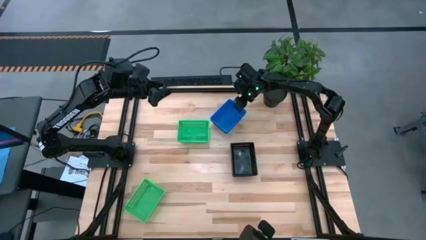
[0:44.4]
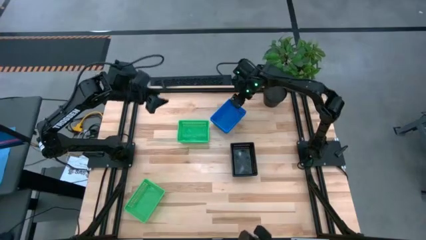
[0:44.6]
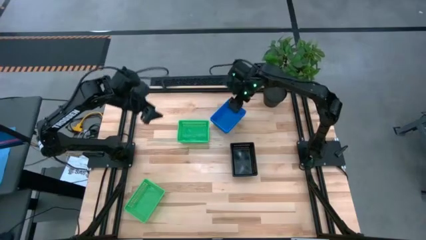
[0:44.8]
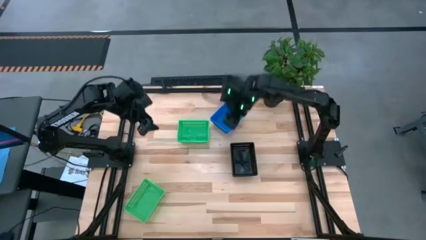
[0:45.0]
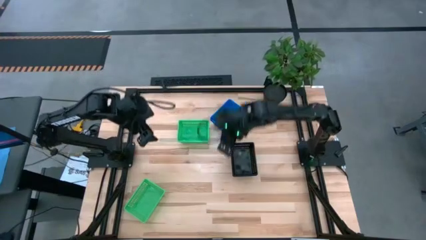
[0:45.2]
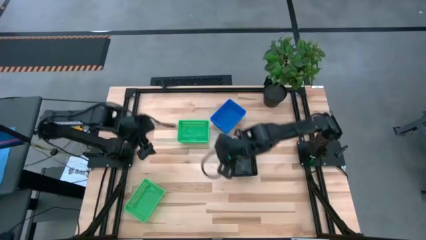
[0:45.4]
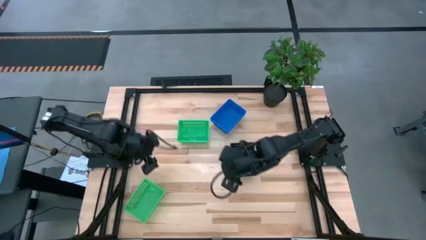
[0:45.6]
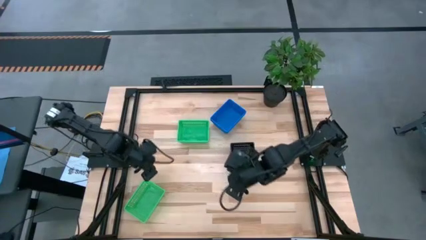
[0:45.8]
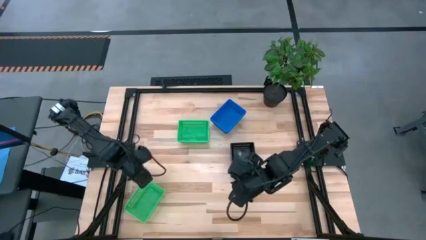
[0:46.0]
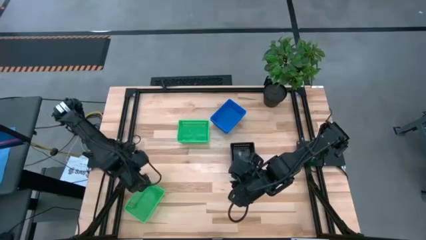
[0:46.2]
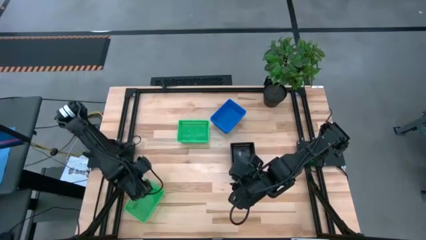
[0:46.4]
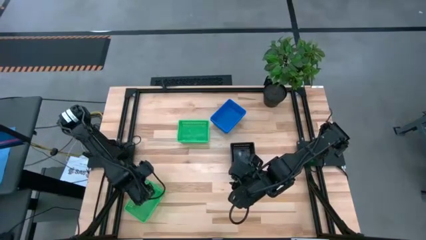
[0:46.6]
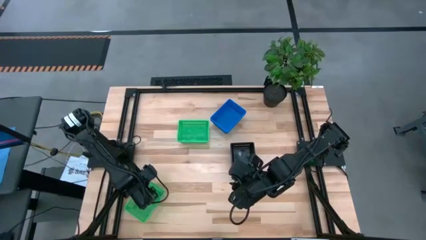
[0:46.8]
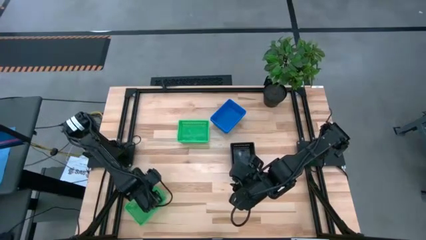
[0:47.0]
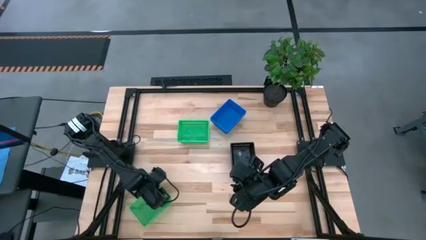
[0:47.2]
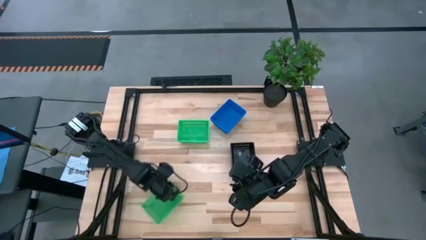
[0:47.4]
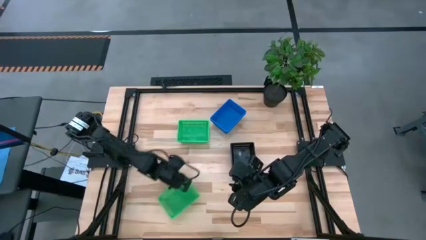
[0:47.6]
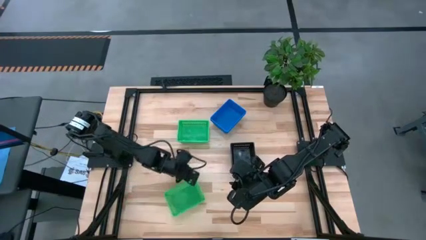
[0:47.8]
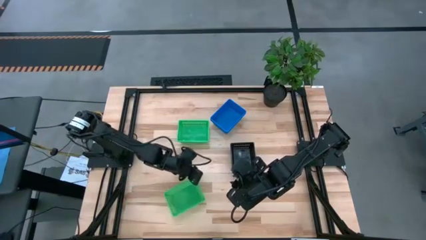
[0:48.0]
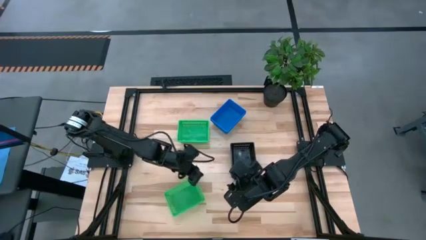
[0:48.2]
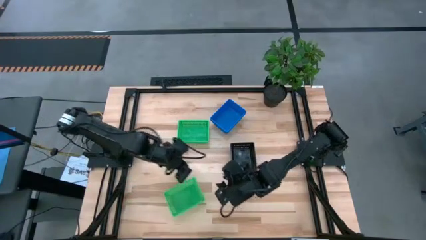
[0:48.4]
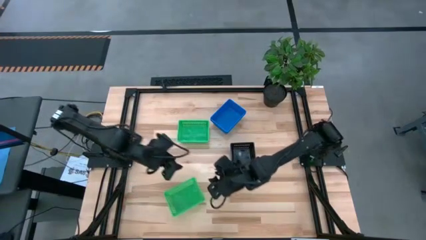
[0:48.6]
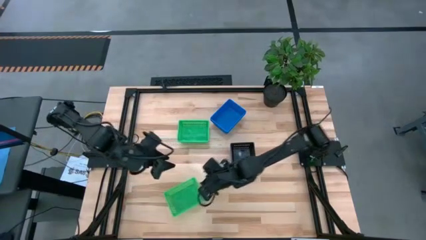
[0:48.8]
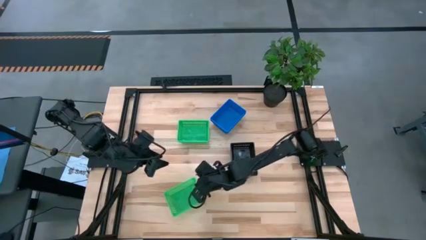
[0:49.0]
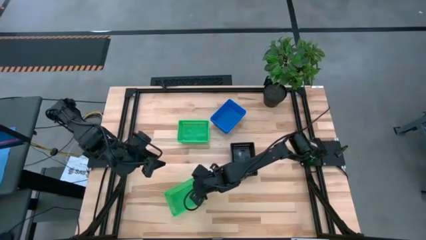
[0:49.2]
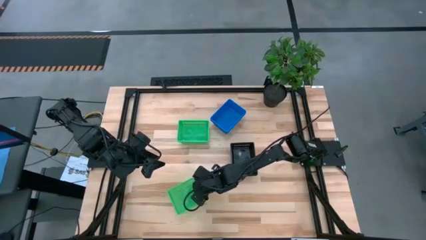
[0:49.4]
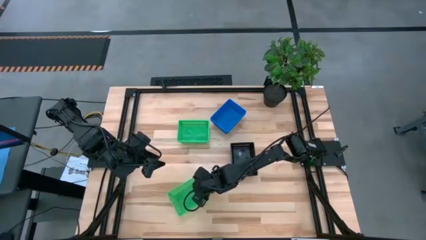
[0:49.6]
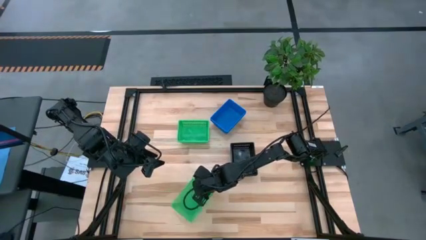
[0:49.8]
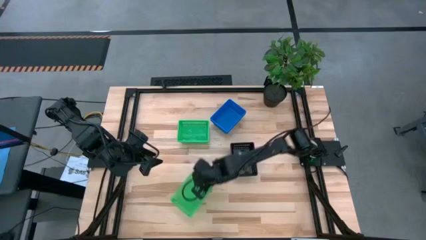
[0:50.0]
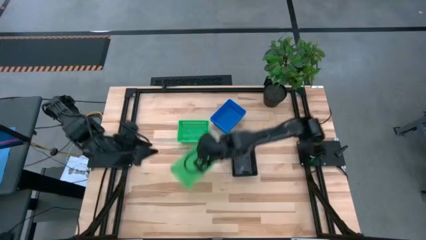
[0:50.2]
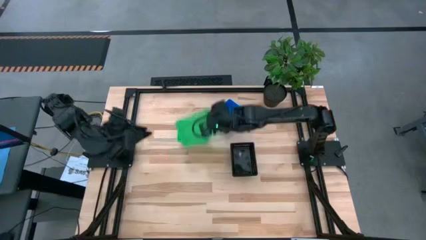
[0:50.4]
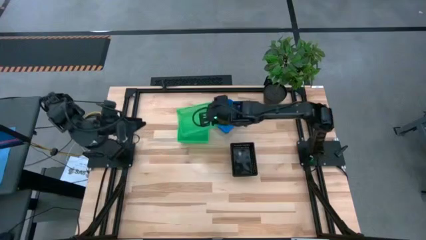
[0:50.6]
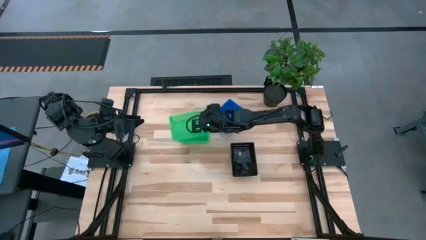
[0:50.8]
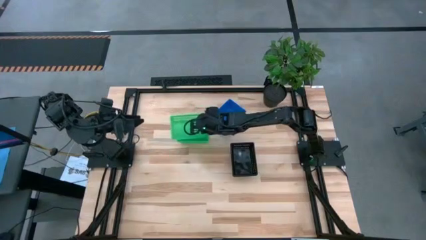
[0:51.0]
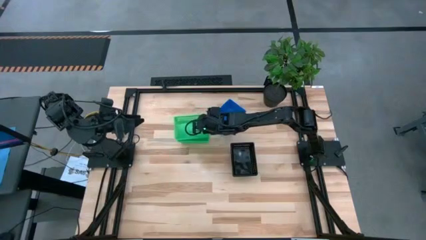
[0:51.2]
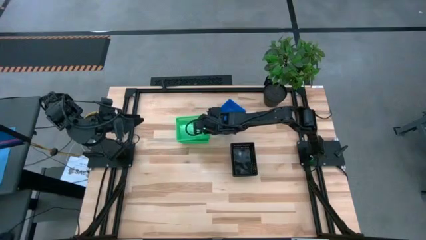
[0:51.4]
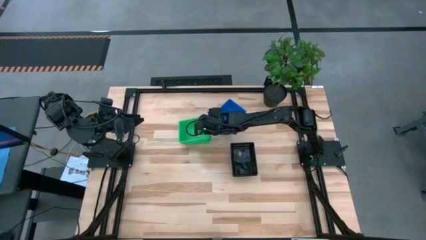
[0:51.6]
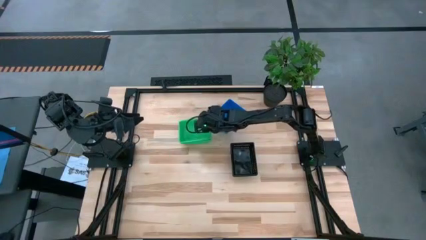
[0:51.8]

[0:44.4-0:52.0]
Stack the bottom green bin on the top green bin

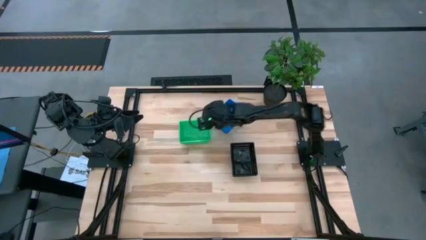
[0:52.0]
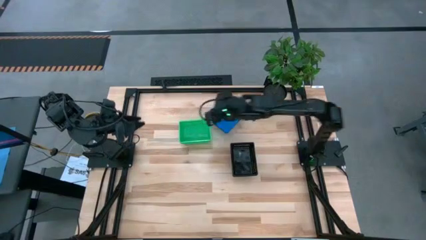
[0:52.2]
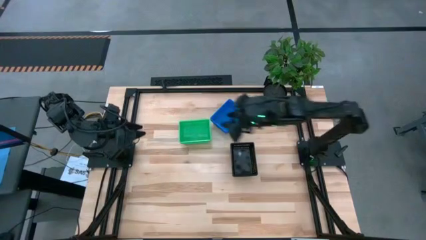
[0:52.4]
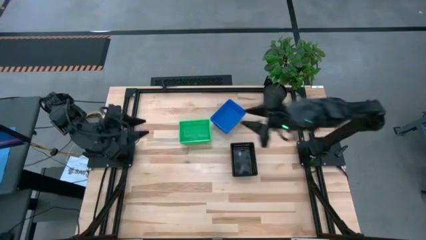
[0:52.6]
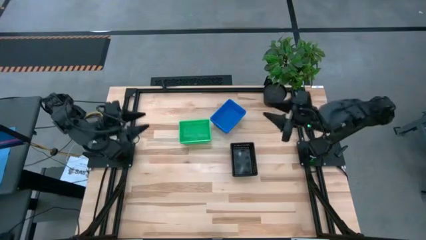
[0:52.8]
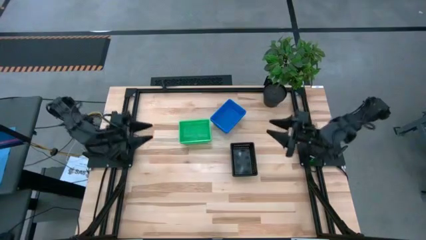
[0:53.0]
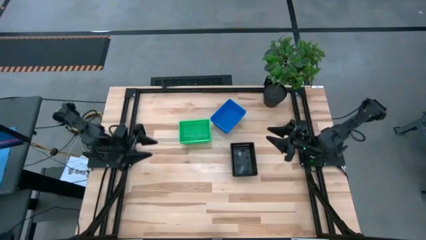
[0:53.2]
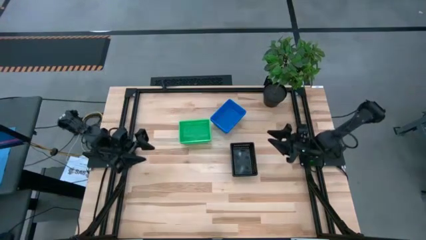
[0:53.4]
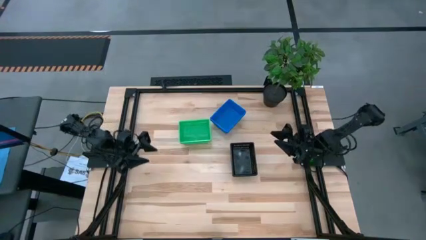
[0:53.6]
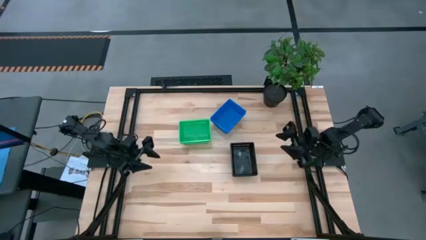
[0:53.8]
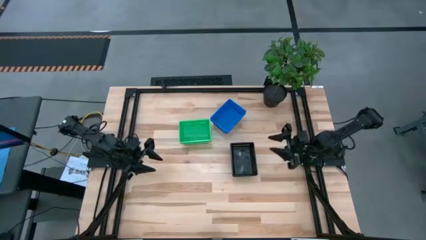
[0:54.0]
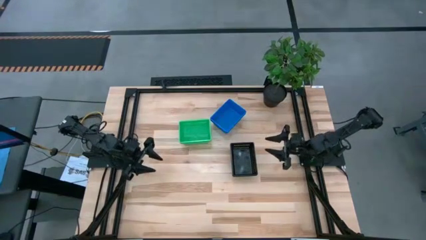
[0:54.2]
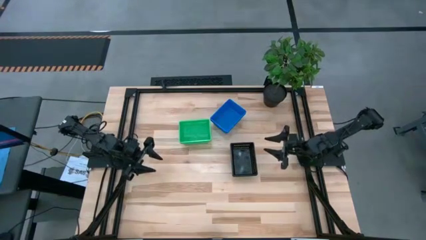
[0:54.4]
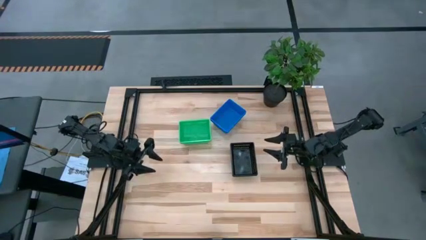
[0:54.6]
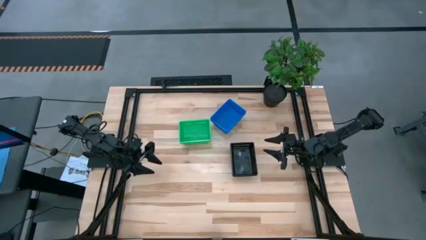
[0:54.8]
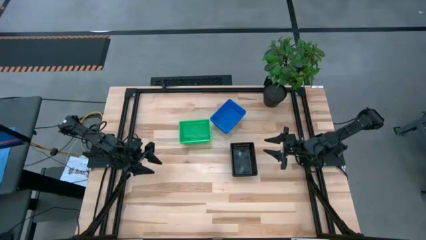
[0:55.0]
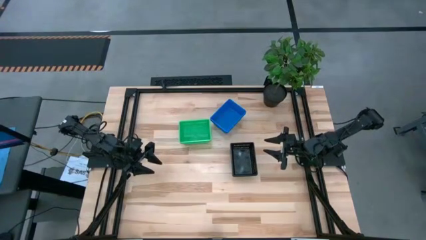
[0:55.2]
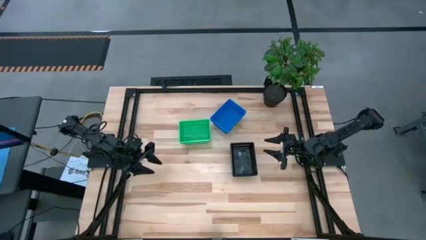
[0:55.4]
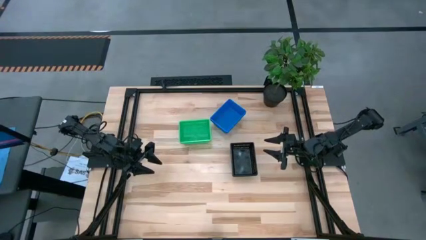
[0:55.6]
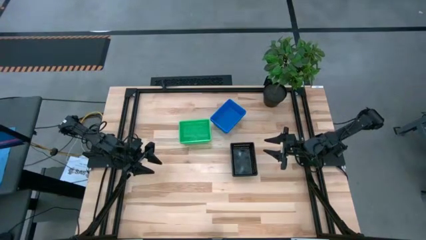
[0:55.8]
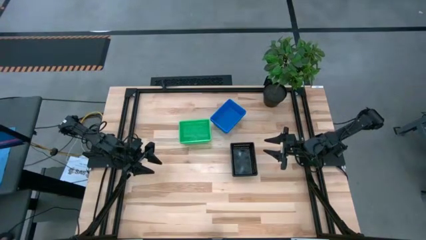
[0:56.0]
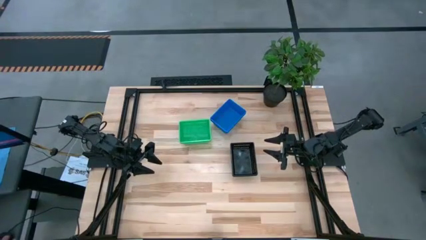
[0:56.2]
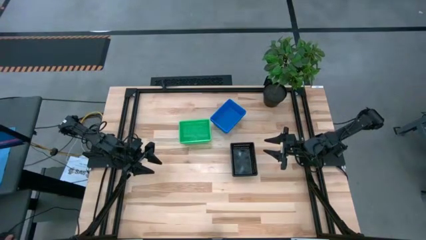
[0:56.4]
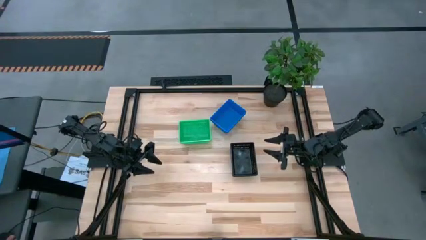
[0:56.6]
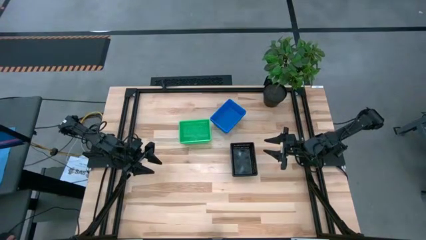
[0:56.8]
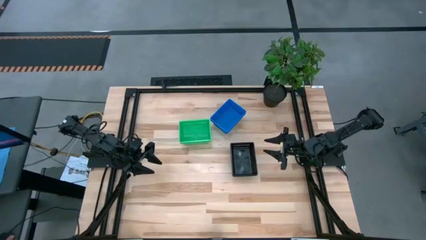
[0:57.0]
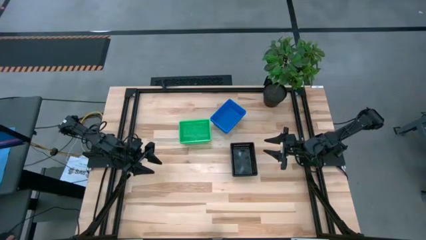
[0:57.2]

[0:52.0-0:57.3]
Return to Home Position

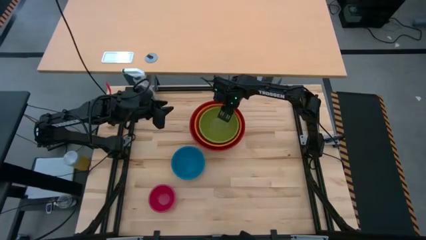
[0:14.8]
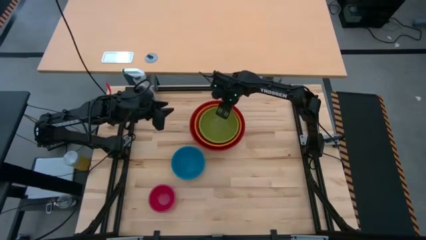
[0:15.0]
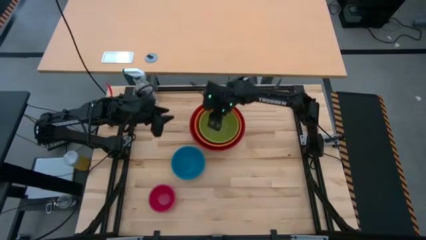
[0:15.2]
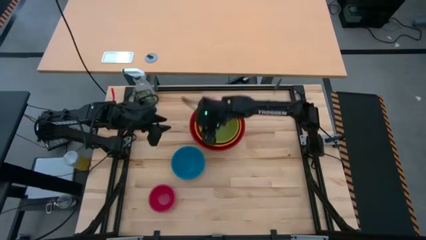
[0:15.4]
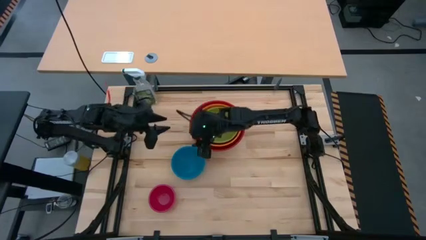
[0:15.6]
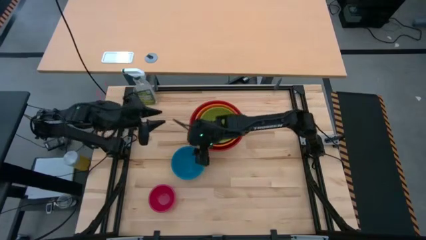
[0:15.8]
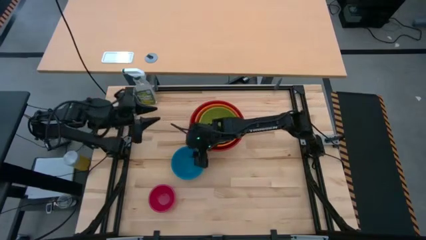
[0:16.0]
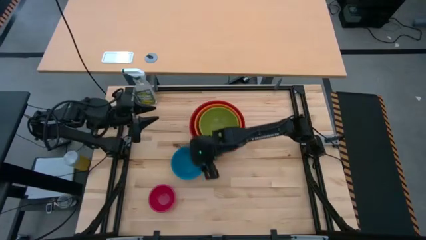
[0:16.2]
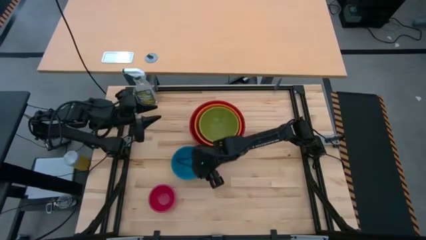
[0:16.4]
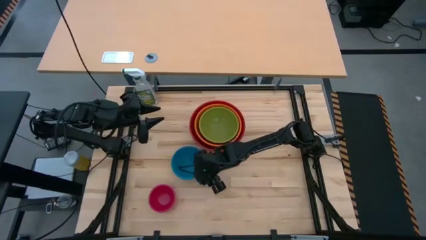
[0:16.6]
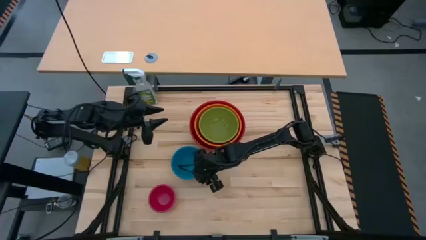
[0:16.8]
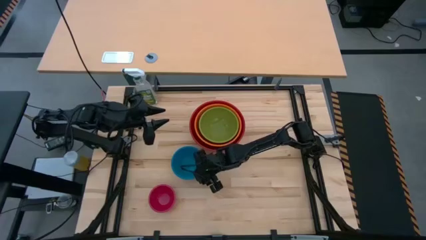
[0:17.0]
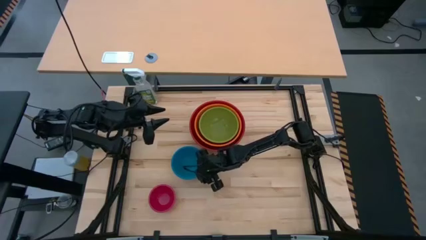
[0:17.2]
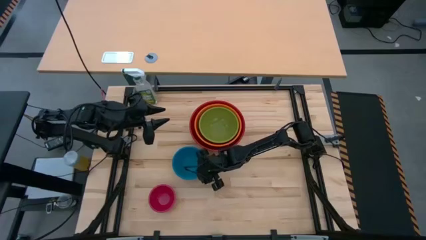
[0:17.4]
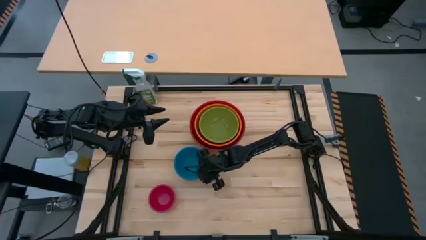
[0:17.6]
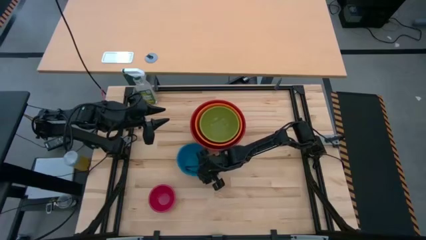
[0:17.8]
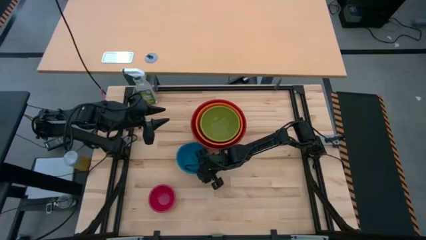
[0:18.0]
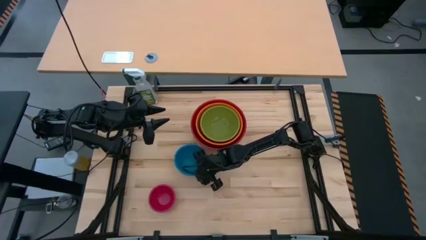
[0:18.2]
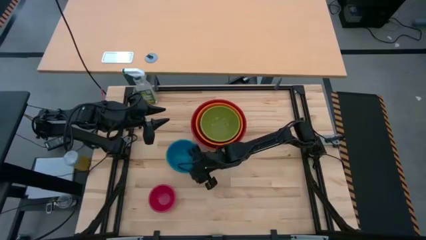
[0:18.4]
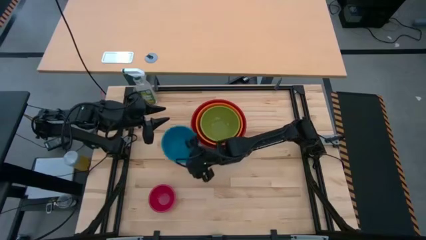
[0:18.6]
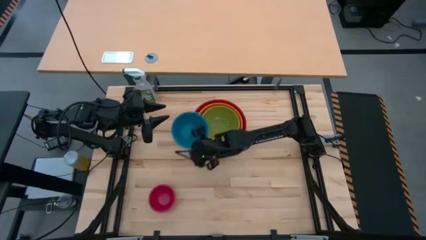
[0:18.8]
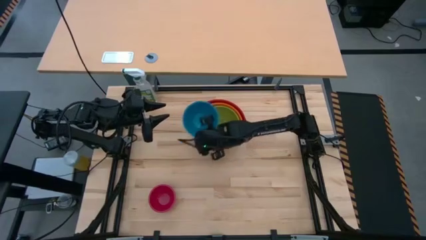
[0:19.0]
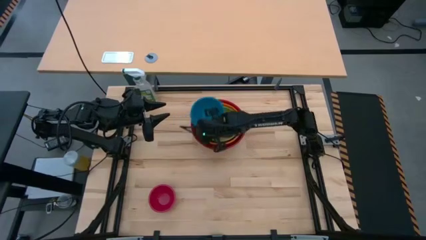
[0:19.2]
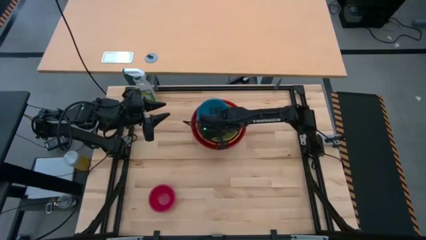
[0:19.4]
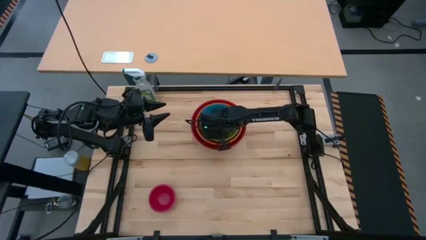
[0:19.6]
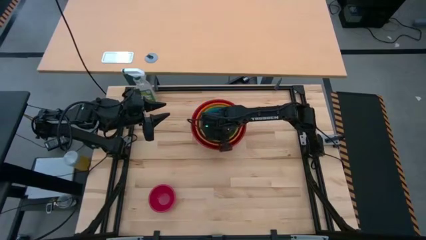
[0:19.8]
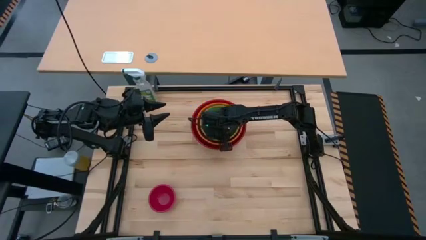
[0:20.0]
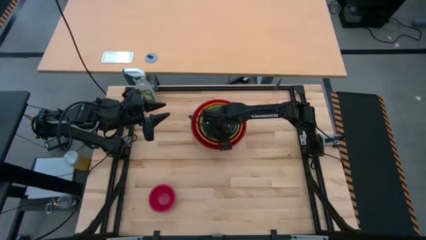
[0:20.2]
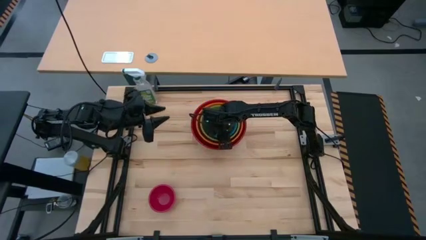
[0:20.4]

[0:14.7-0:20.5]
Stack the blue bowl on the green bowl
